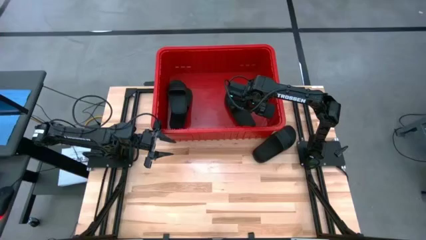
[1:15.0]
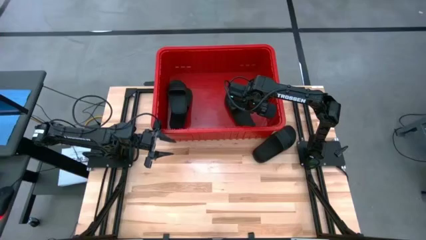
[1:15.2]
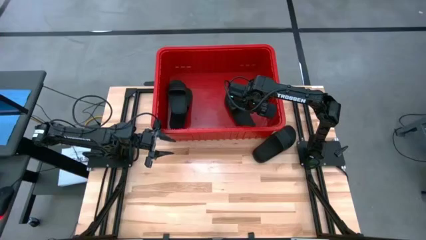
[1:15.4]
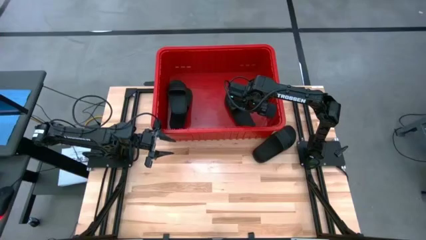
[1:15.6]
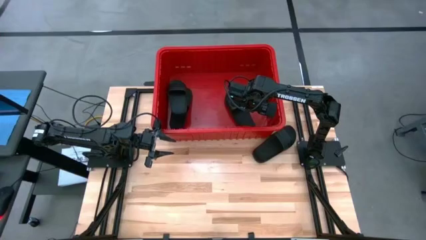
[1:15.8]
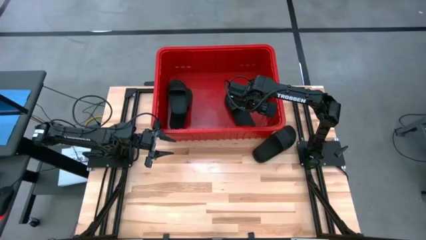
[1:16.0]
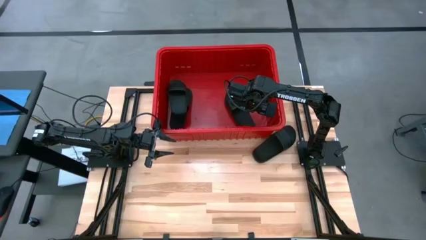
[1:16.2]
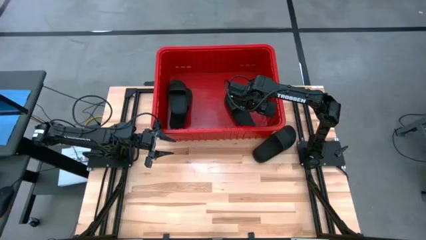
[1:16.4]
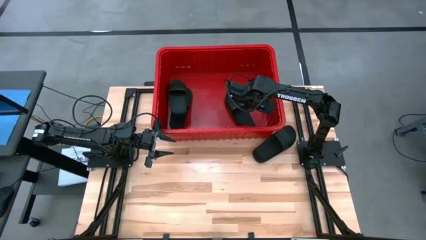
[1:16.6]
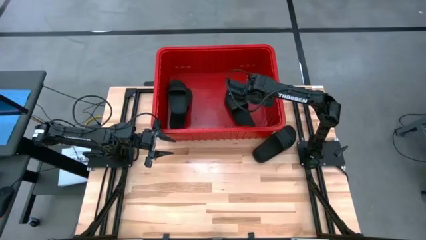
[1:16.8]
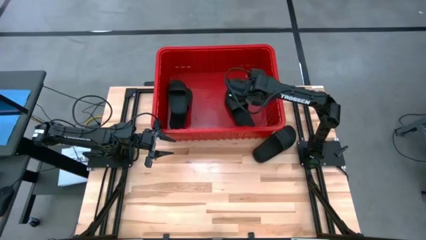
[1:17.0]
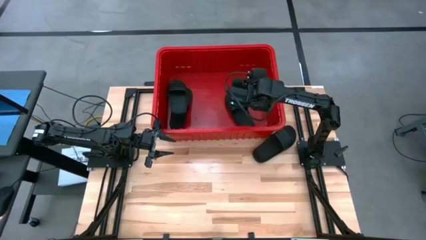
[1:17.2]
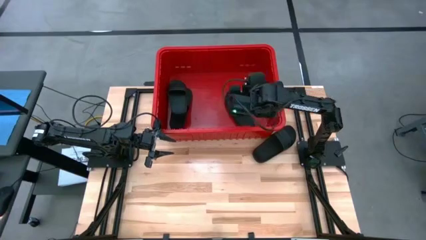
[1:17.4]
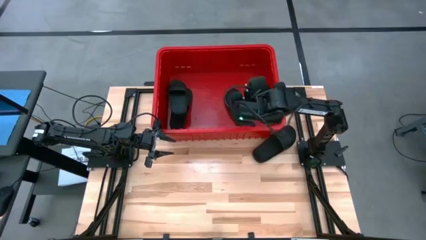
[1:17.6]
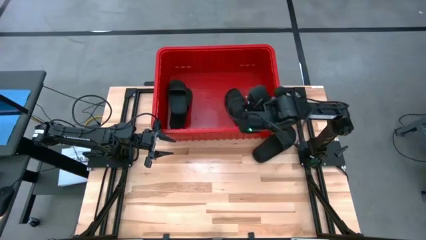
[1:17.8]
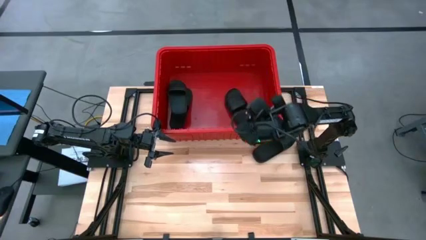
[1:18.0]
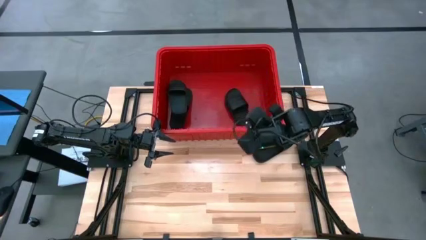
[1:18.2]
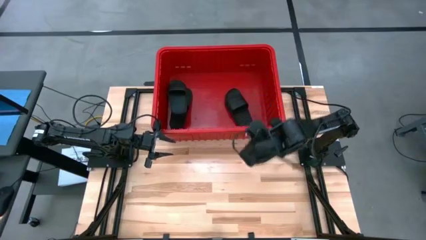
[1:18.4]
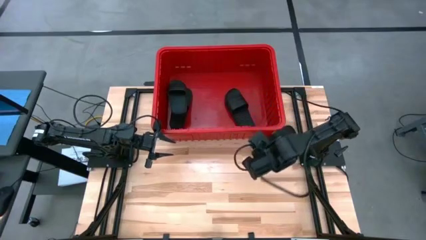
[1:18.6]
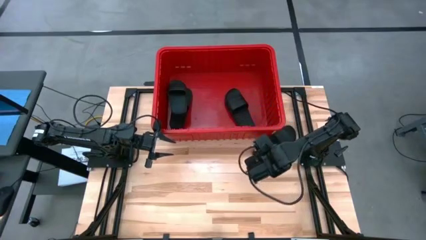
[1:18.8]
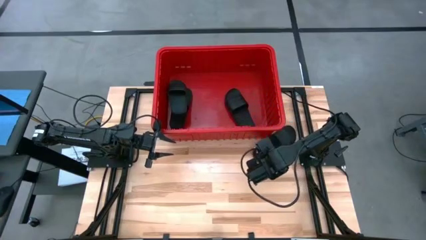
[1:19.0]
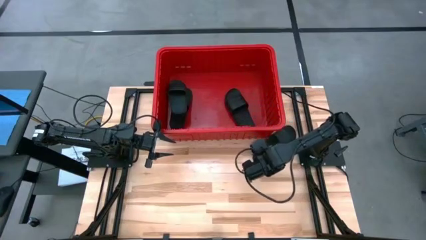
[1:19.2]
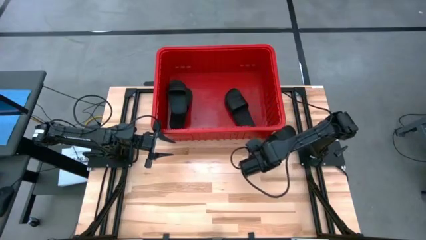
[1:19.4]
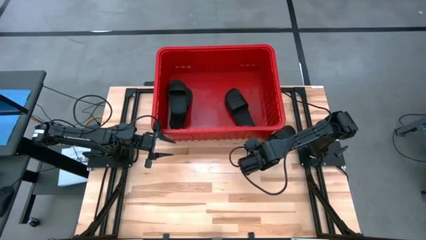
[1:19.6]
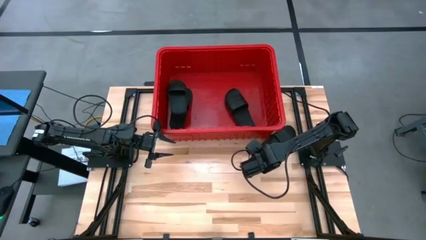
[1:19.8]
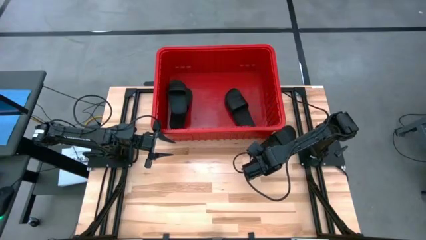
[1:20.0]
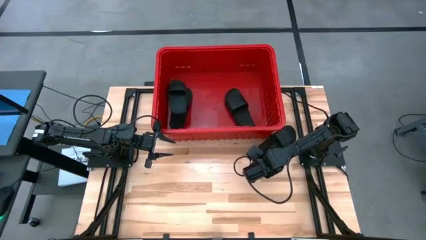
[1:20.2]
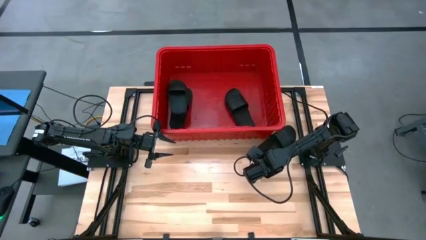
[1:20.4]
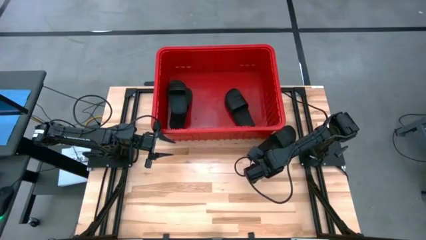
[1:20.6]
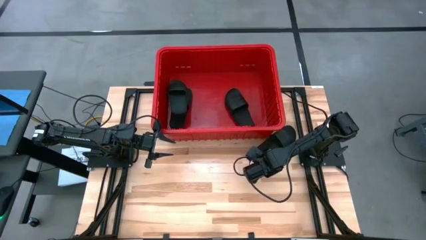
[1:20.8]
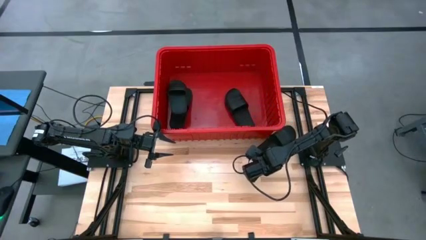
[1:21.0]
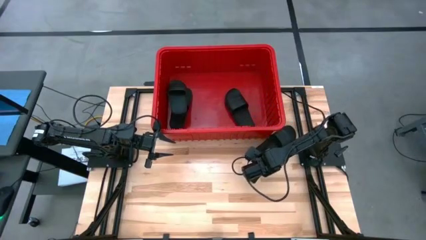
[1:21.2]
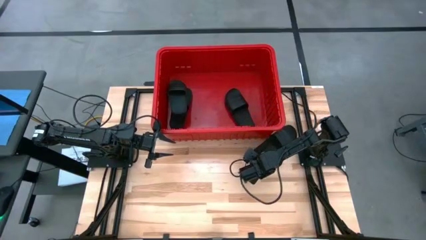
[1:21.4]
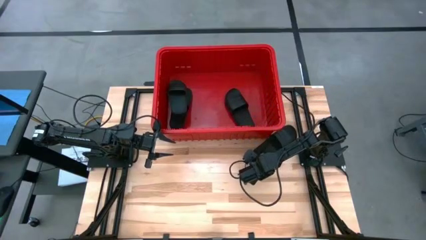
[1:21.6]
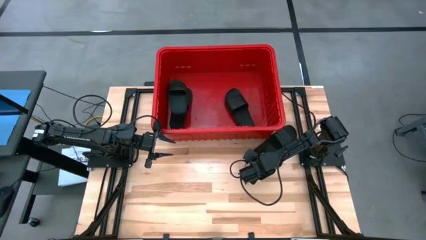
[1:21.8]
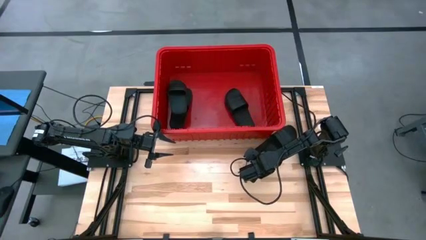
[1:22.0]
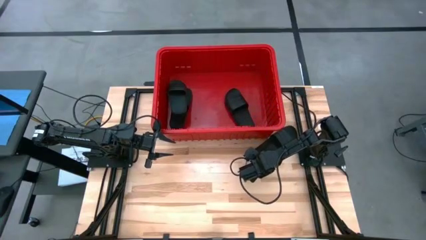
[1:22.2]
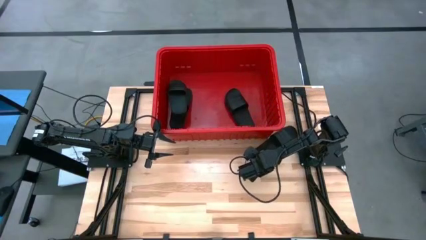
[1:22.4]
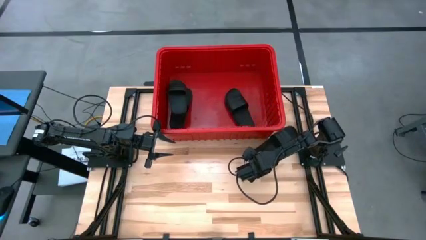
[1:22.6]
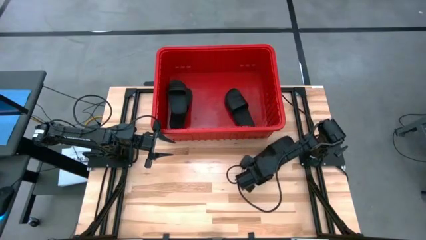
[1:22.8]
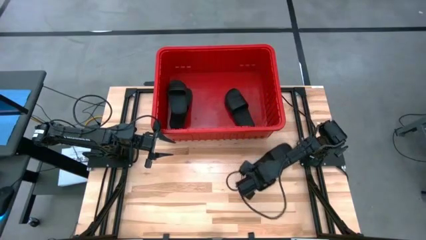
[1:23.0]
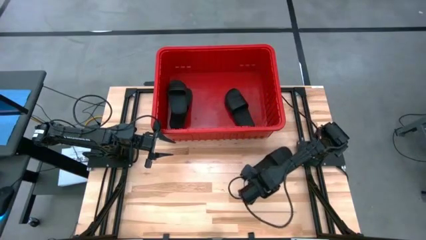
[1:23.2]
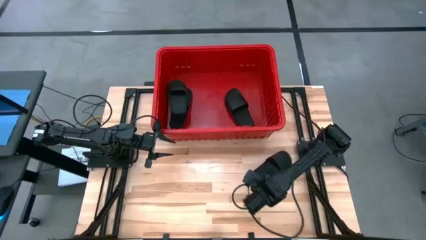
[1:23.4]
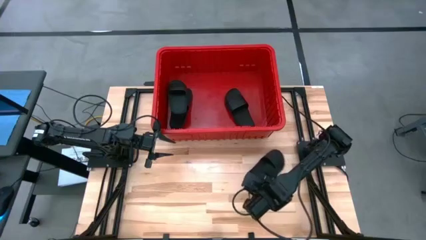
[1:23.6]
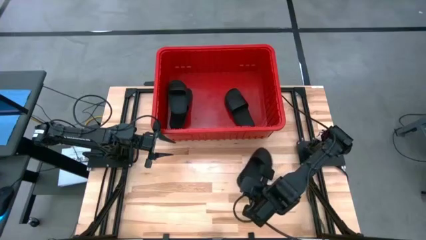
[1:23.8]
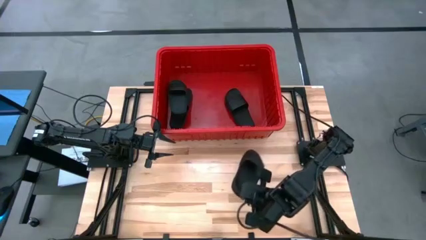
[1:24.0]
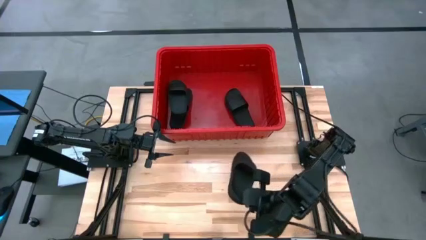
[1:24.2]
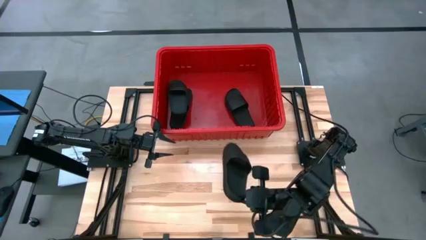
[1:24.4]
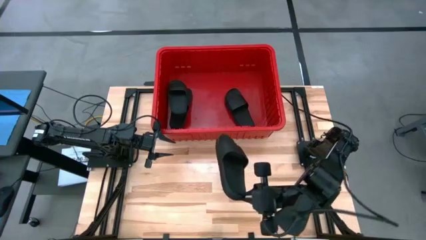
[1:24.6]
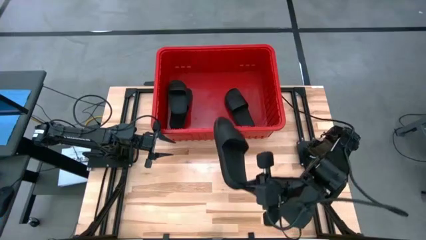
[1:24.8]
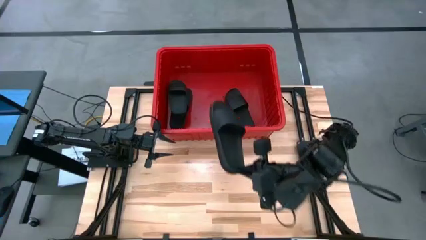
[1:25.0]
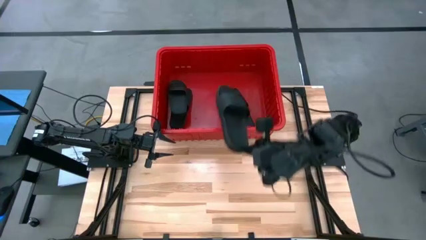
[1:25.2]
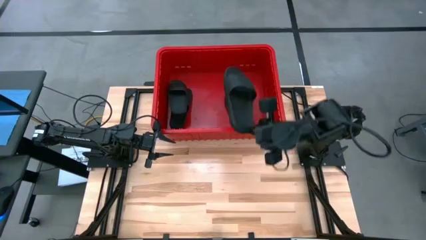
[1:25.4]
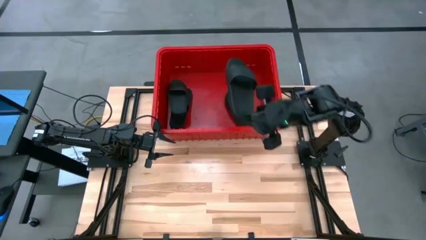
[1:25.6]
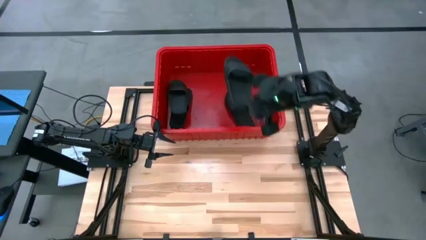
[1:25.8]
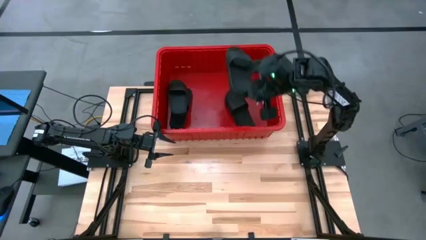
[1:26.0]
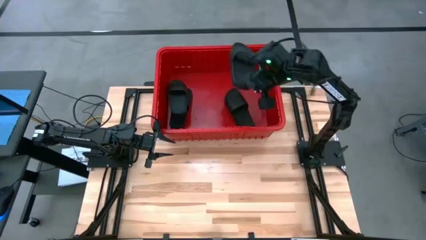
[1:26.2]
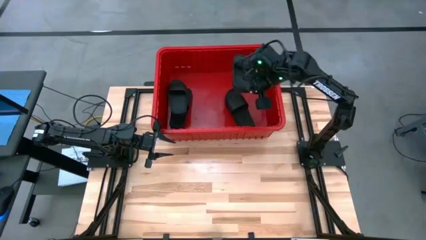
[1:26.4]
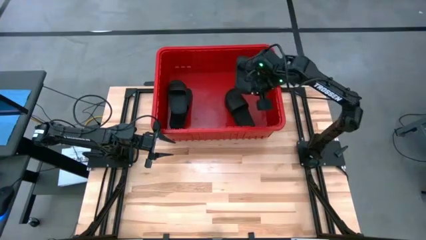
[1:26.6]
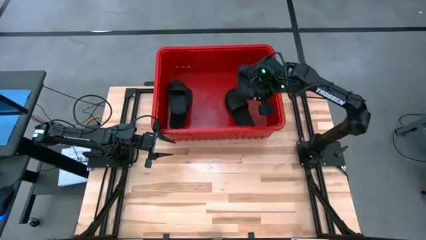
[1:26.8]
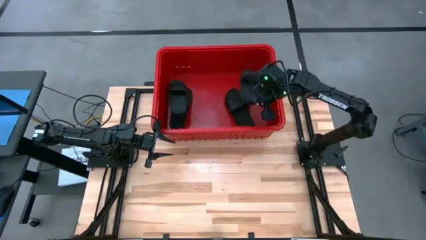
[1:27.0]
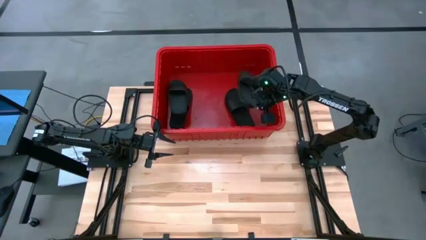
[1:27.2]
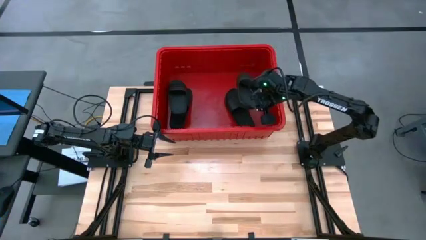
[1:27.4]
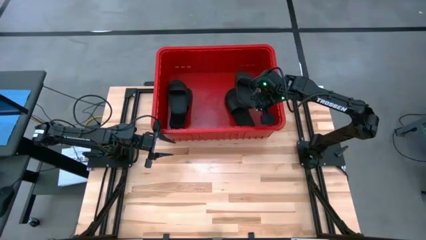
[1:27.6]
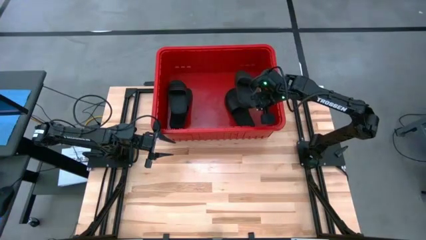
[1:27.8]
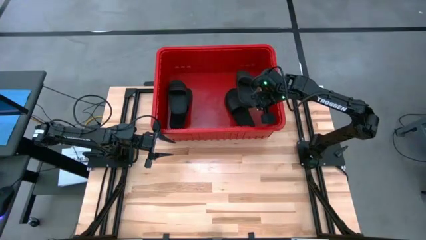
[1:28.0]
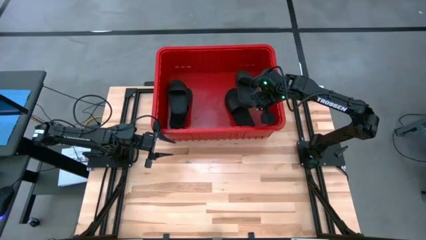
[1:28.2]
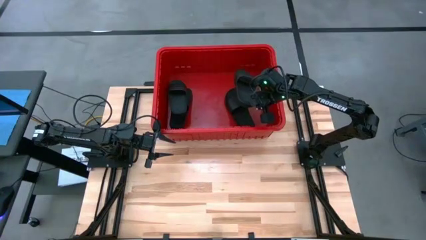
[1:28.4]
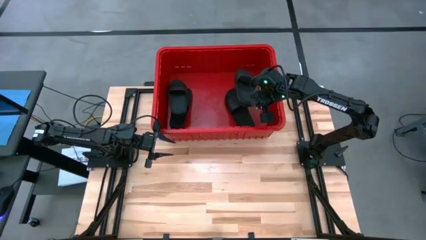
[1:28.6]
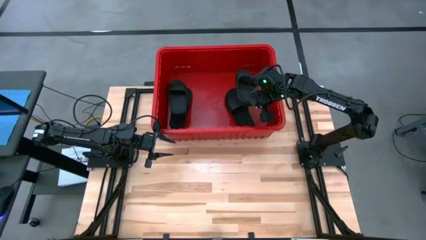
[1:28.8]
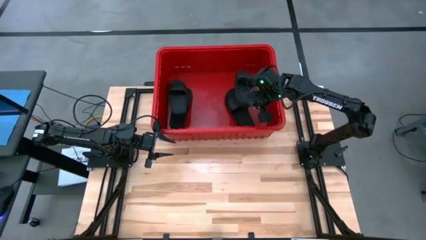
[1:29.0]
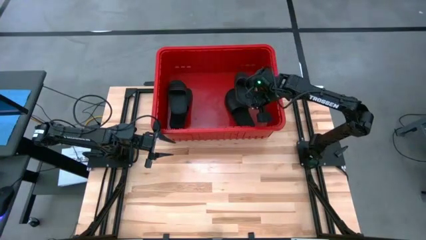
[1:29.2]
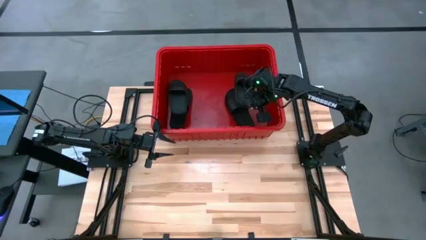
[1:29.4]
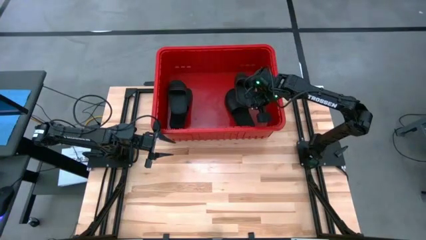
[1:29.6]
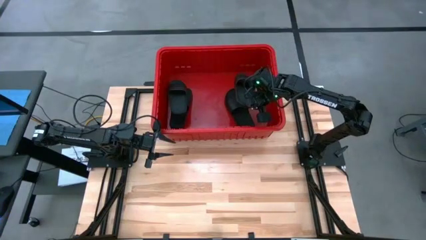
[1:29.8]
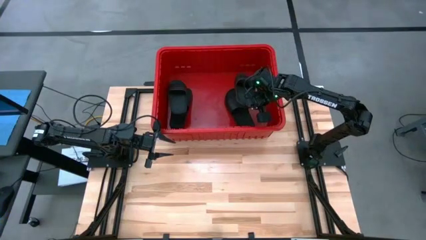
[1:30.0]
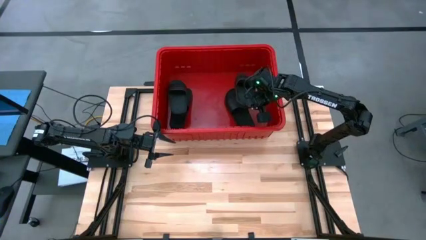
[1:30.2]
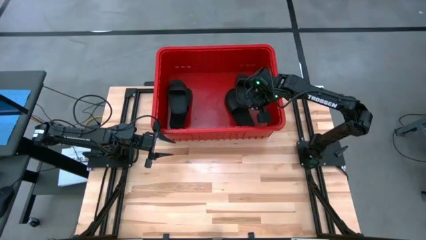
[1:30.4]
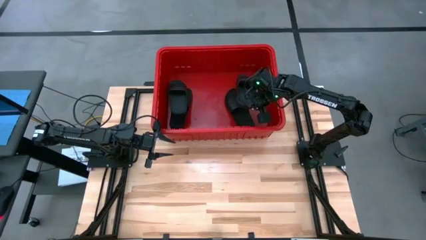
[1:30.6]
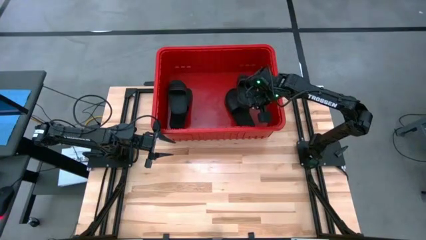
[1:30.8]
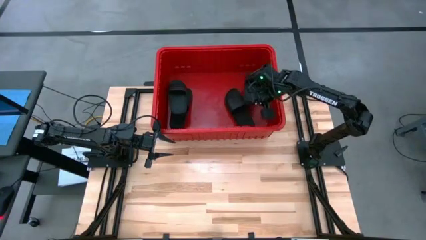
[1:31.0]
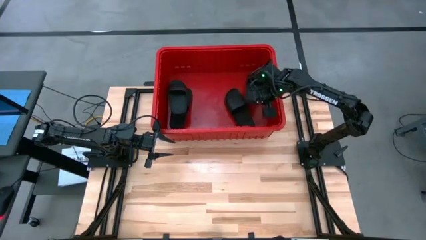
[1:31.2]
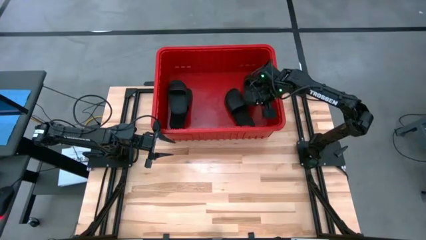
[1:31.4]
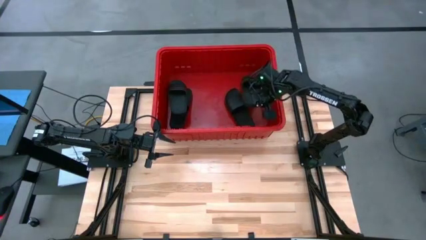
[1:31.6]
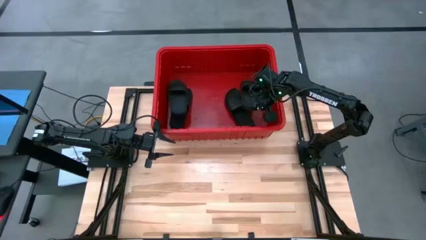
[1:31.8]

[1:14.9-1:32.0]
Task: Pick and place slides into bin
Stack the slide on top of the right slide in the bin

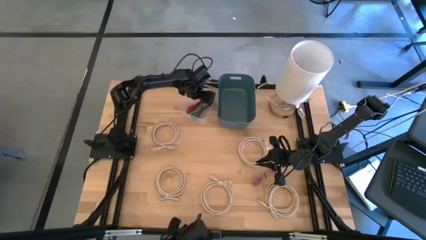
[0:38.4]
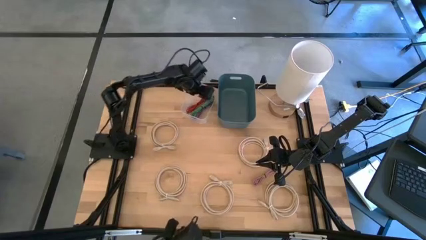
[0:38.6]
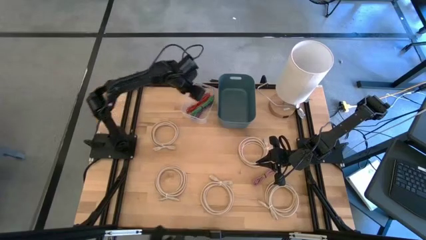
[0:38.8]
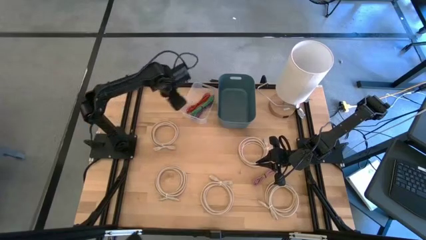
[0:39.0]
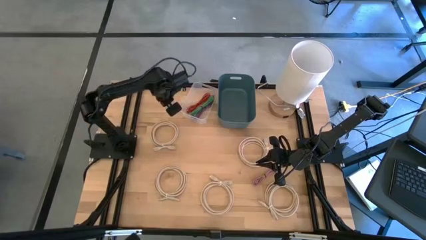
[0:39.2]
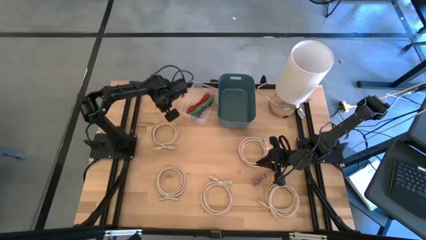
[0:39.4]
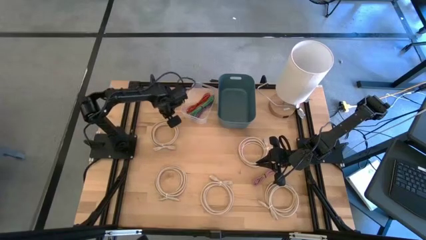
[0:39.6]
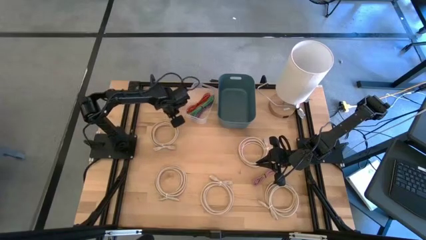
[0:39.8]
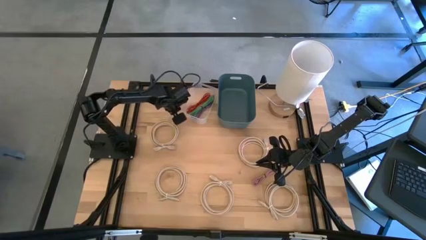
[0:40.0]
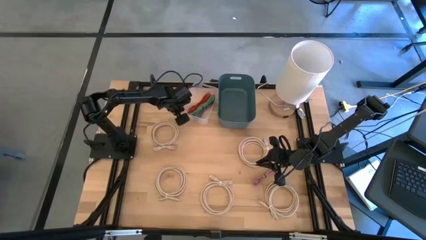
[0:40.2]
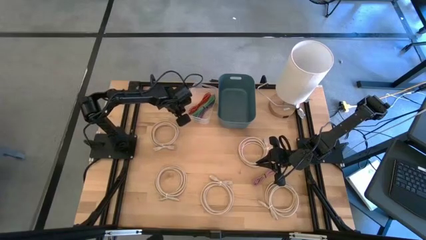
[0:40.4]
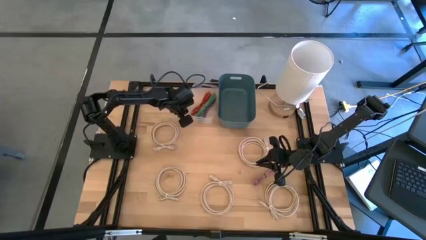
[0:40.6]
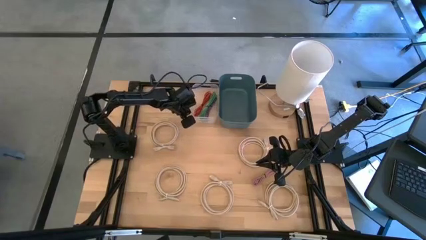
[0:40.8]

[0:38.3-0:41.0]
Task: Pick and place USB-C Cables
Adjust the transparent bin
